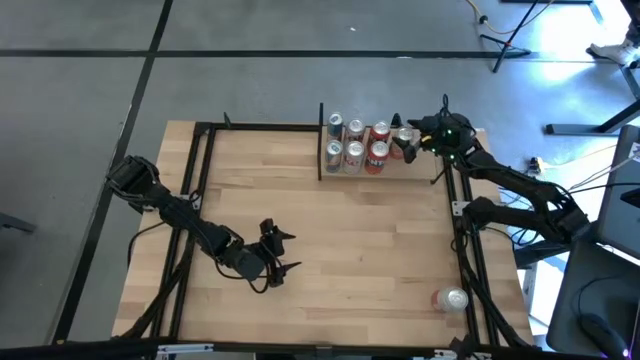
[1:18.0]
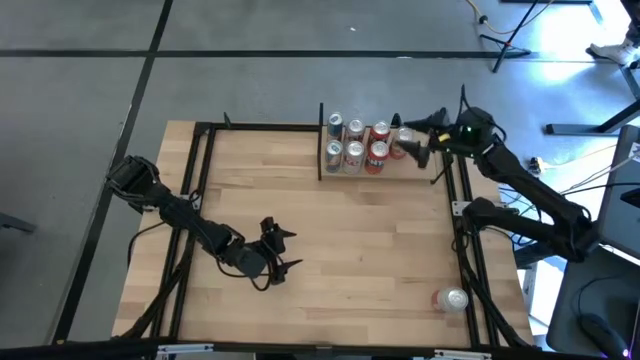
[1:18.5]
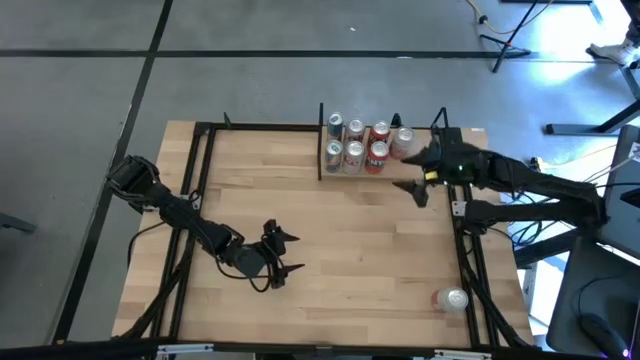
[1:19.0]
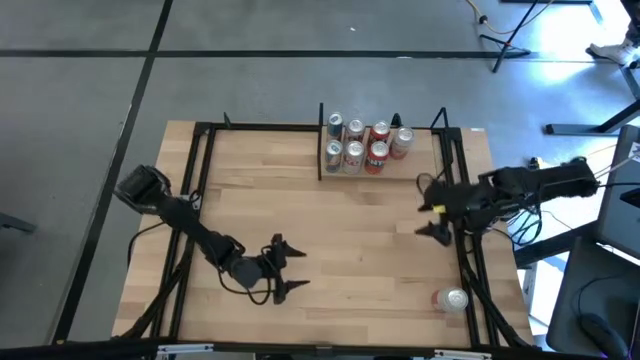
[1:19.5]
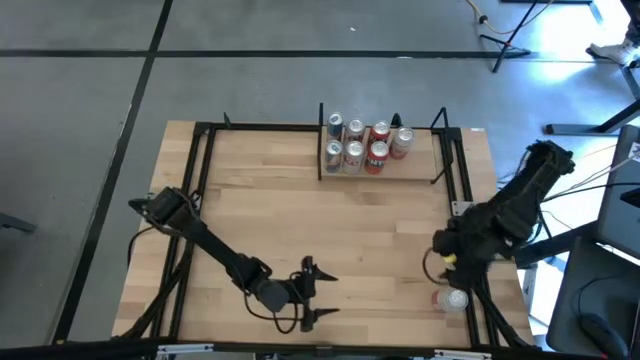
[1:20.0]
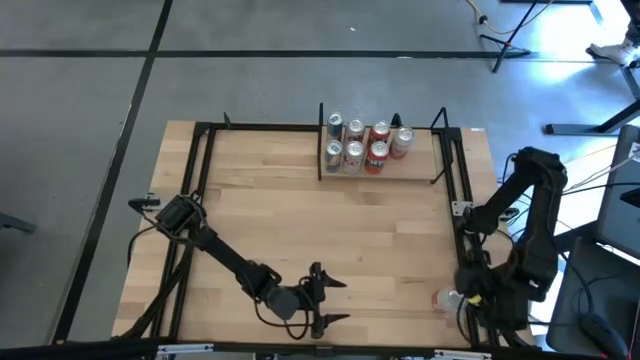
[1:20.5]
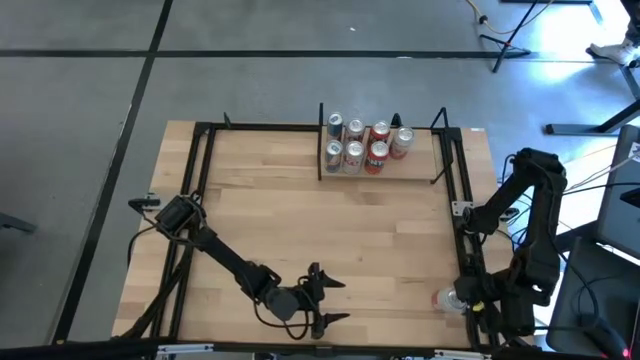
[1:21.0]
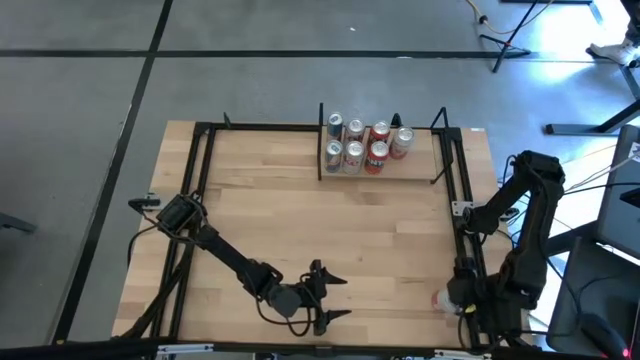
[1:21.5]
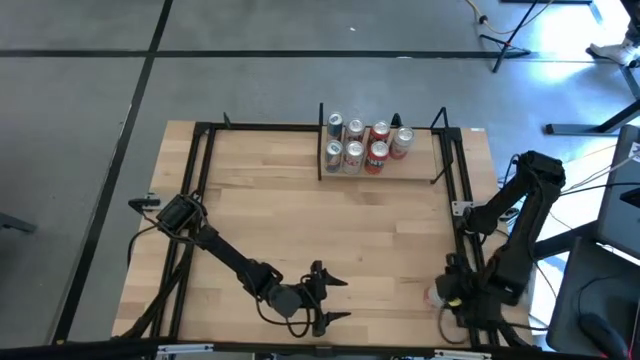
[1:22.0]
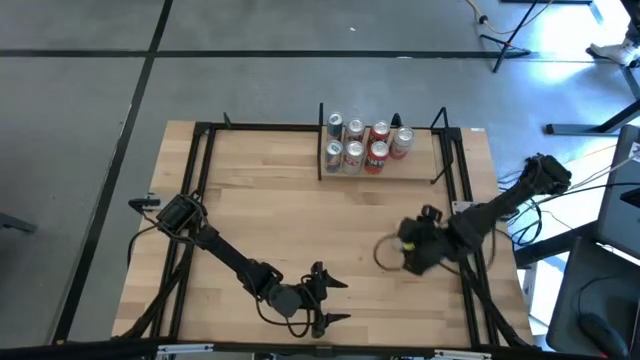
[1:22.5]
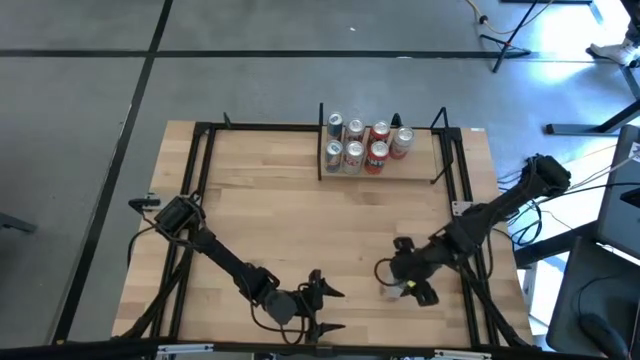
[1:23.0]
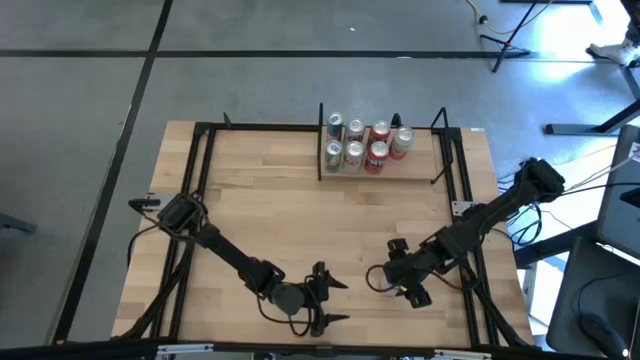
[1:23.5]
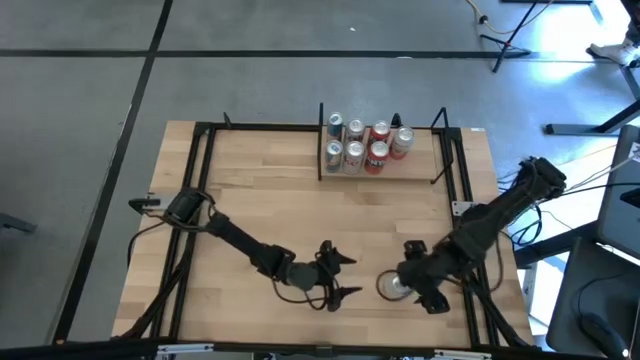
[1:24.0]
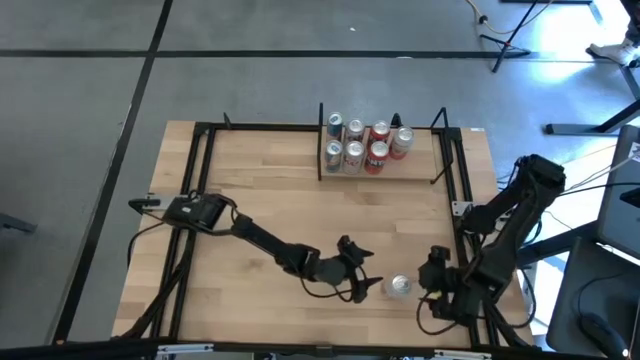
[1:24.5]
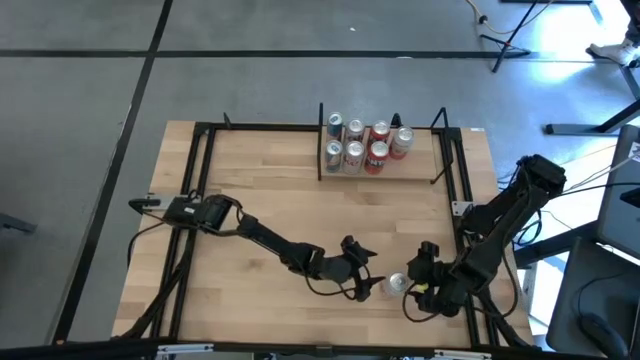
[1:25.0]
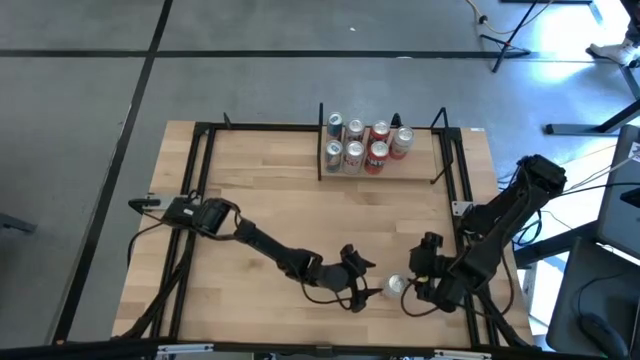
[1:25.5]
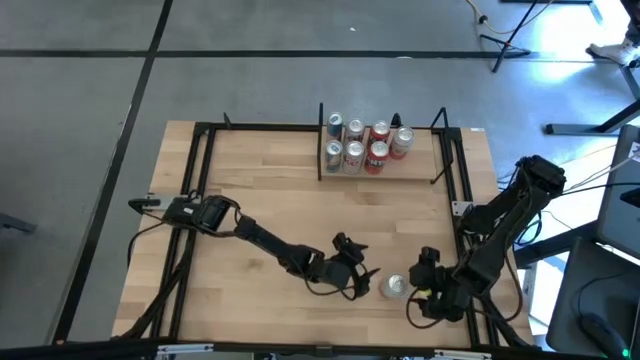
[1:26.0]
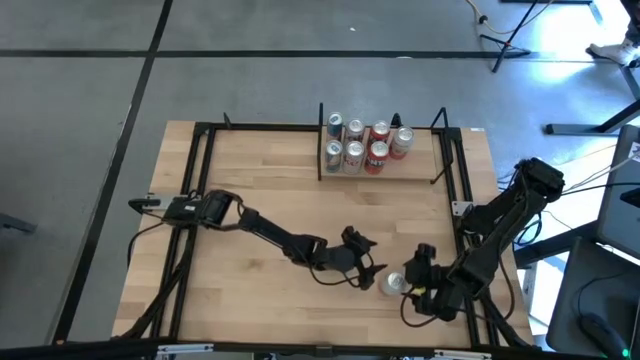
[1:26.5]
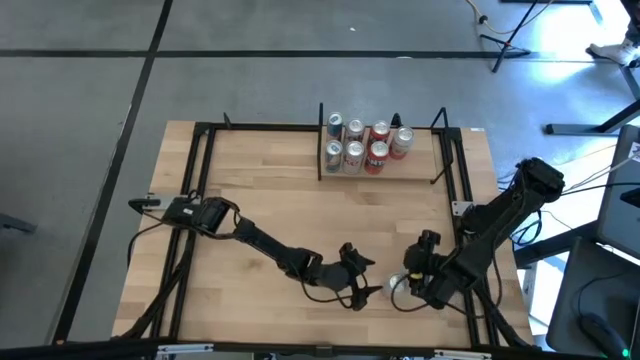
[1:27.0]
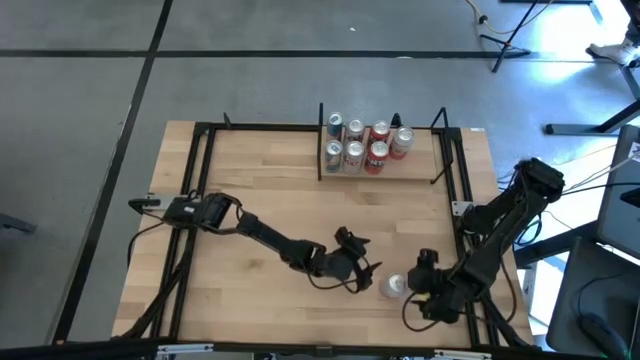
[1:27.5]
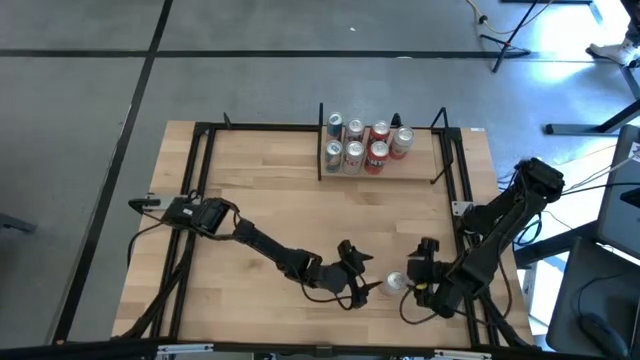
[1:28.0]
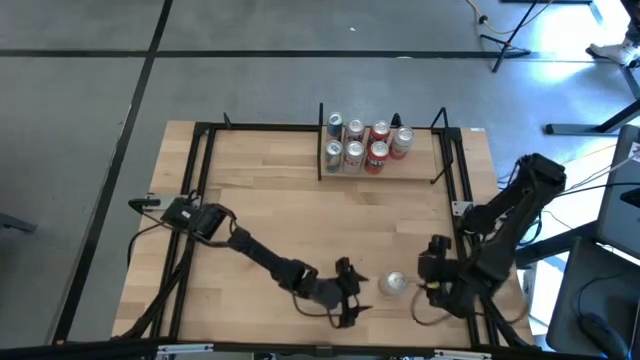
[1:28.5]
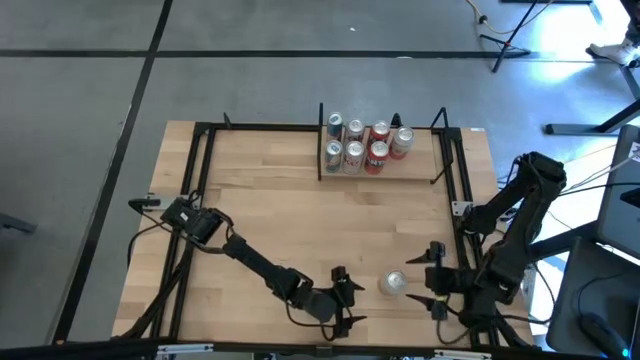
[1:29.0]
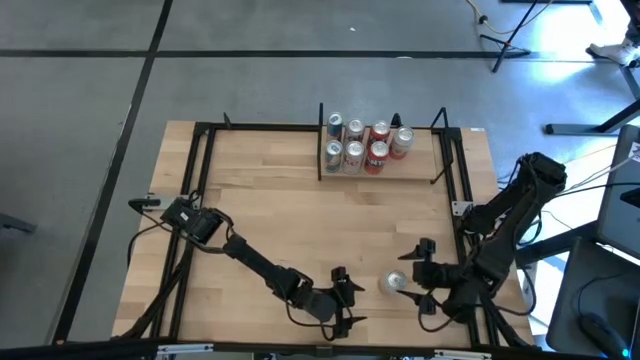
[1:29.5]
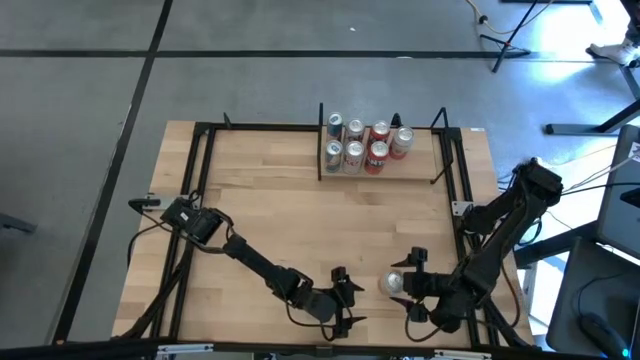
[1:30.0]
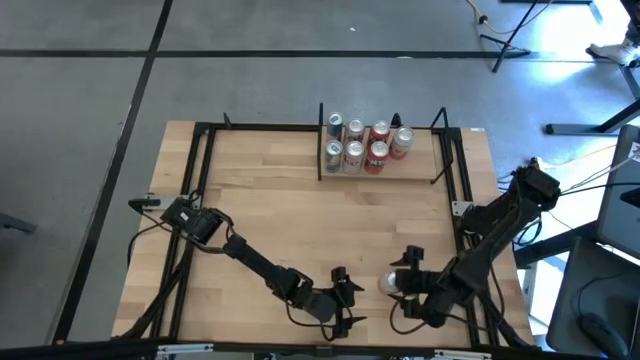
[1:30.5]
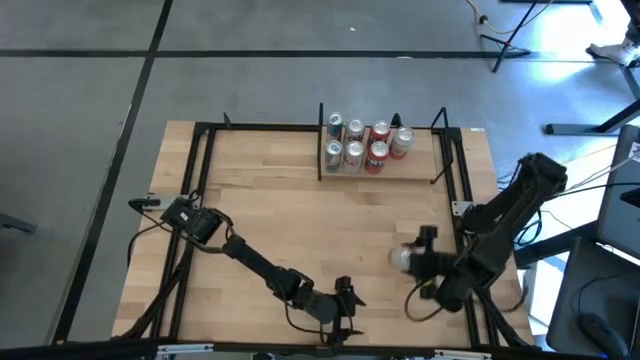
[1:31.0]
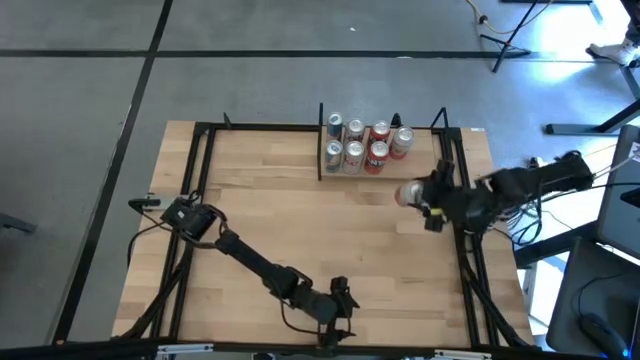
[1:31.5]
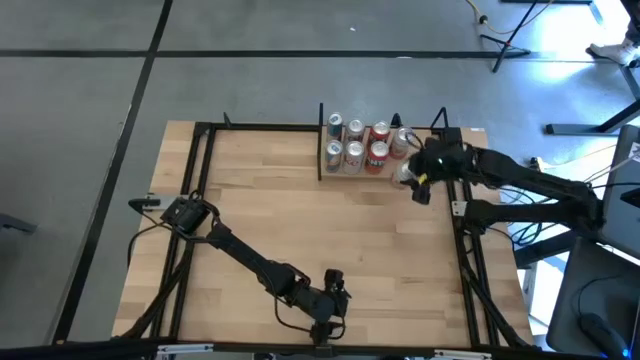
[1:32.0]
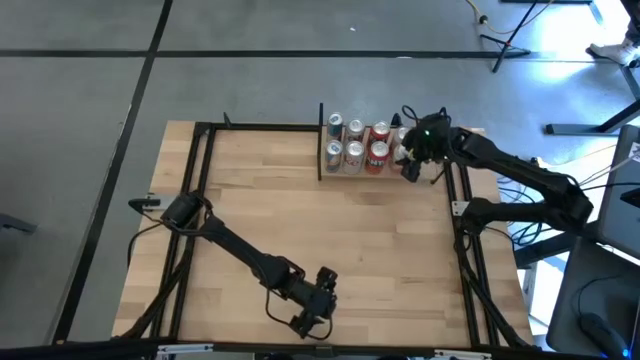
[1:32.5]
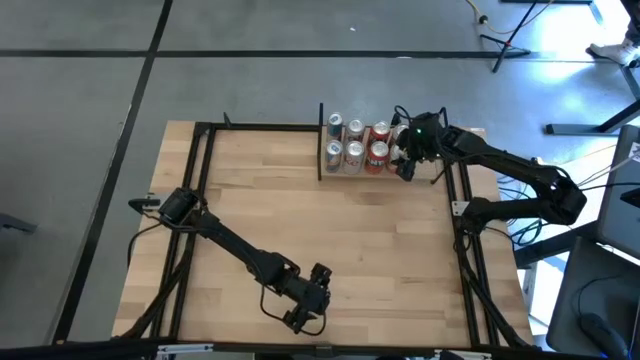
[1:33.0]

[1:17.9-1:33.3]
Task: Place canned beverage on shelf
Put the pink-white soda can aligned with the other pink-white soda can on the shelf

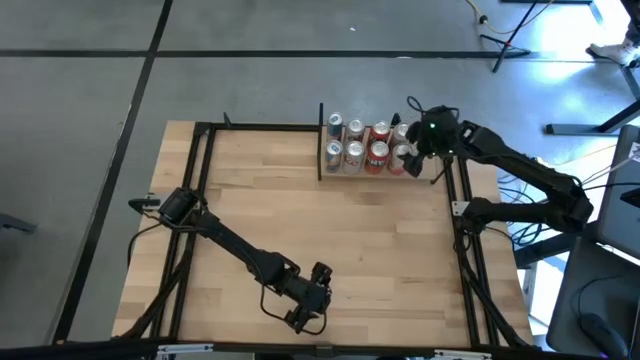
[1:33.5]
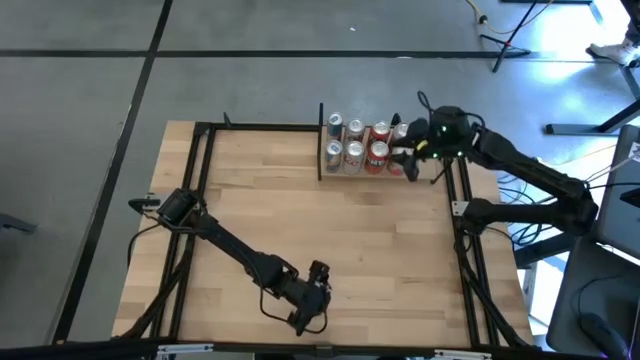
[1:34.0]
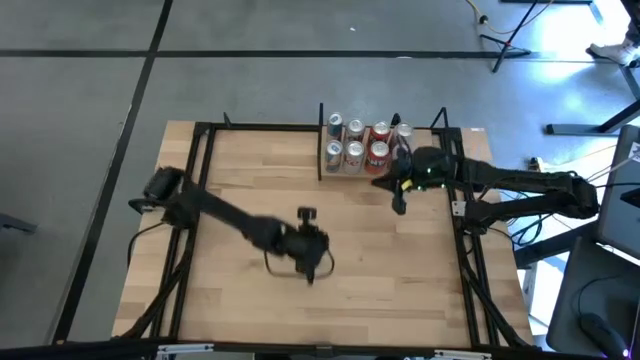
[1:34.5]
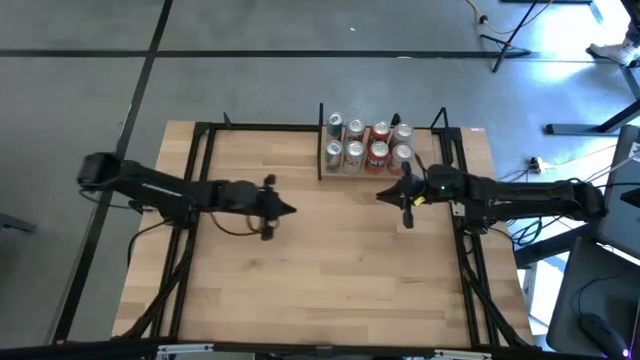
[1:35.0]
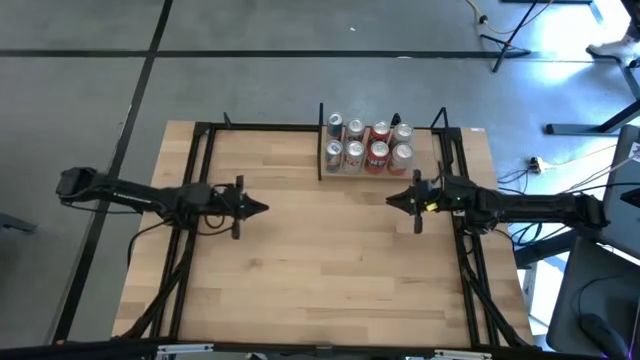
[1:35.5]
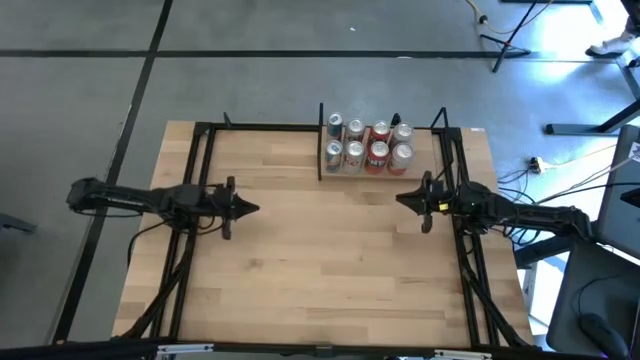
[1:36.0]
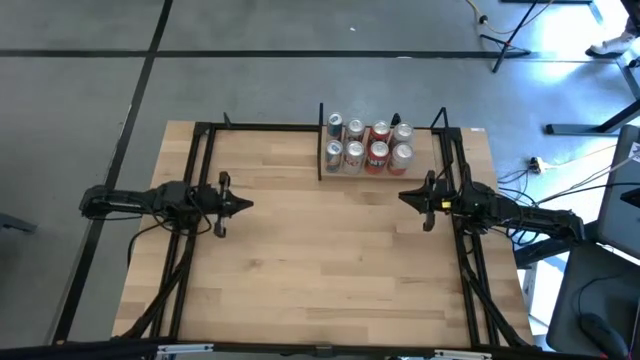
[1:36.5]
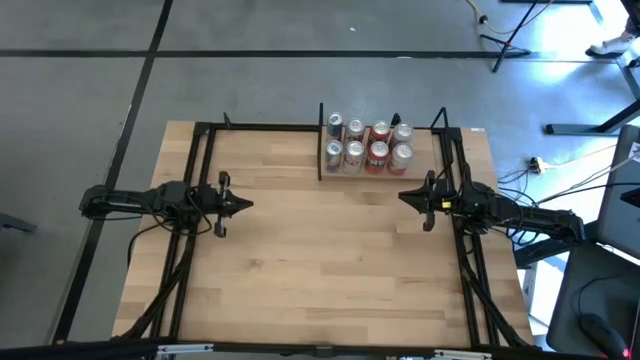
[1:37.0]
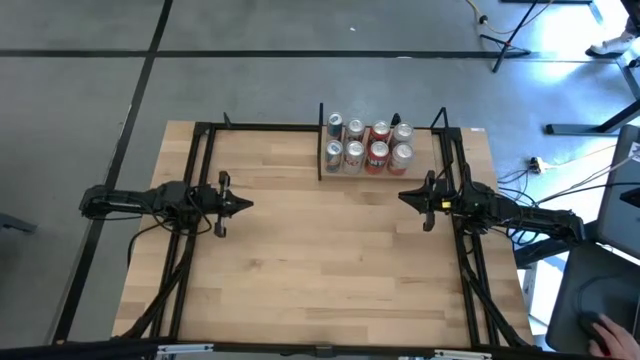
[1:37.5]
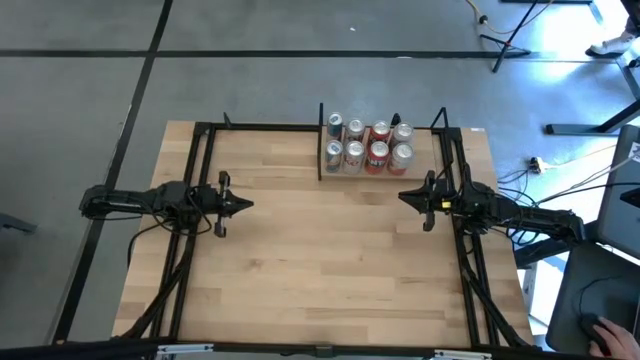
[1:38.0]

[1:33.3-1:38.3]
Return to Home Position

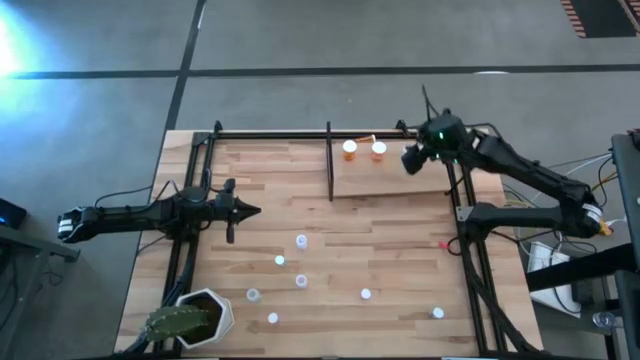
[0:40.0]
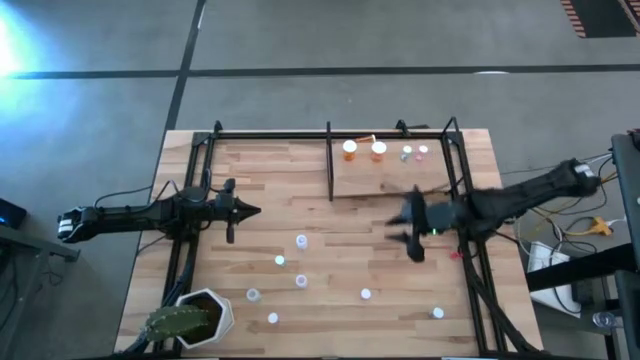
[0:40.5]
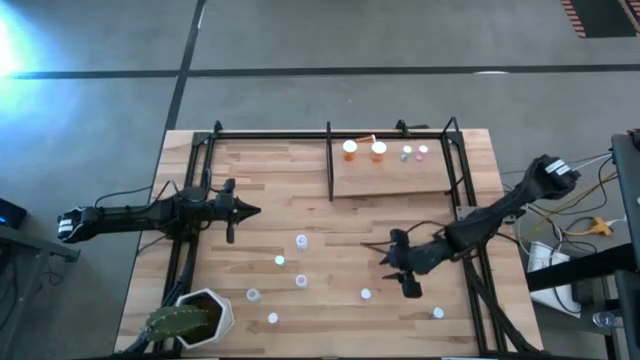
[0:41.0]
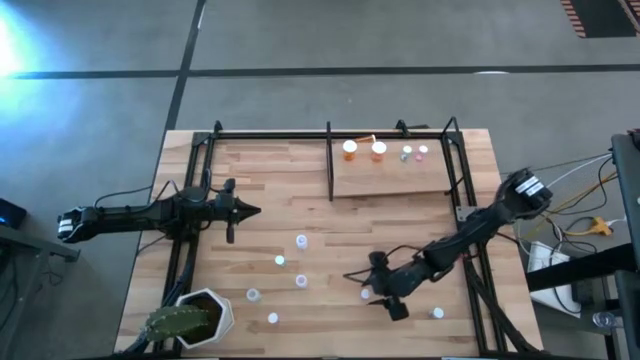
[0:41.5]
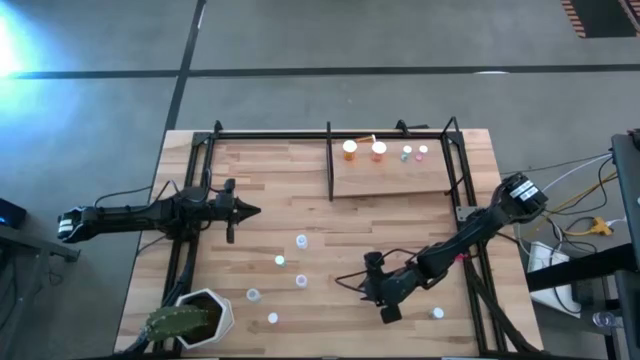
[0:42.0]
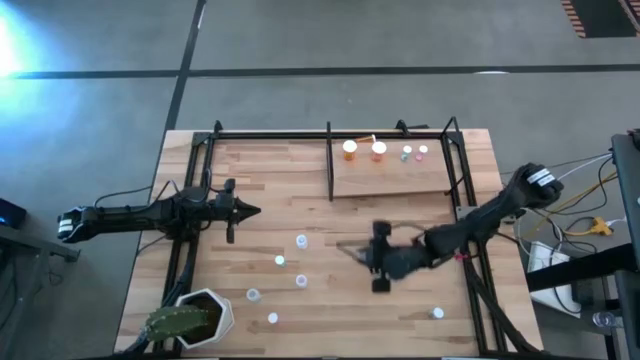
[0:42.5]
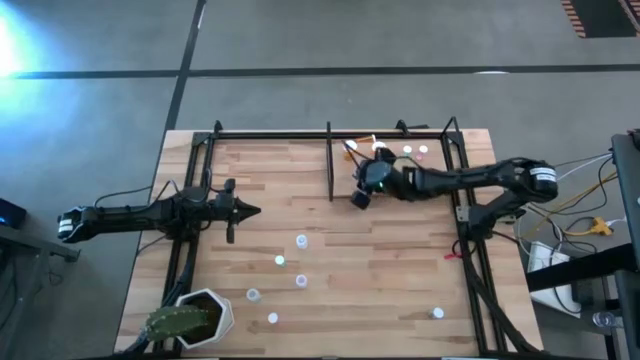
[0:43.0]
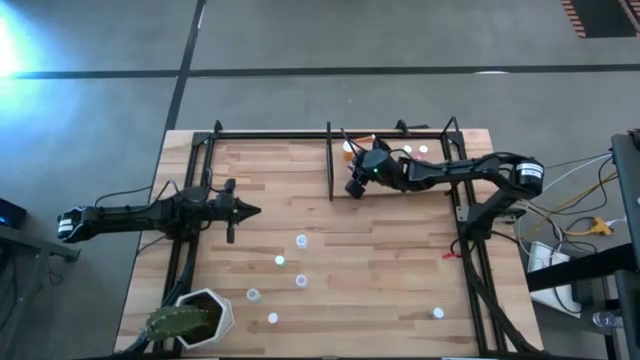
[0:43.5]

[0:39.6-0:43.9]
Task: Pick and place medicine bottles onto shelf by color
Put the top pink pill bottle on the shelf
